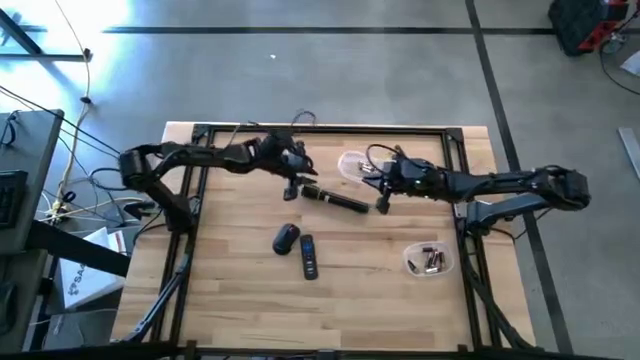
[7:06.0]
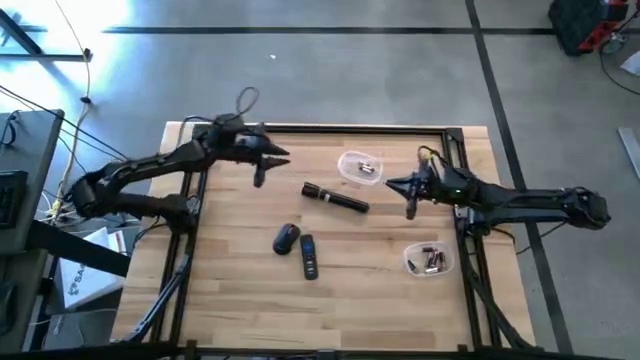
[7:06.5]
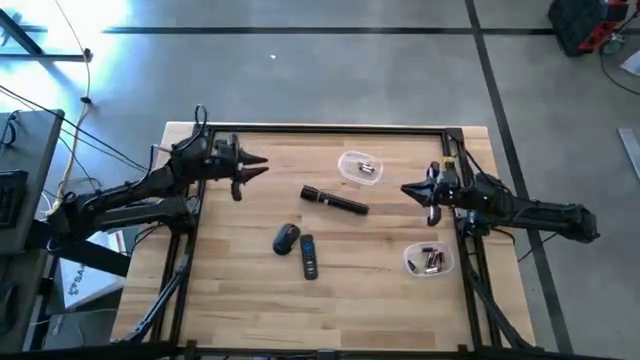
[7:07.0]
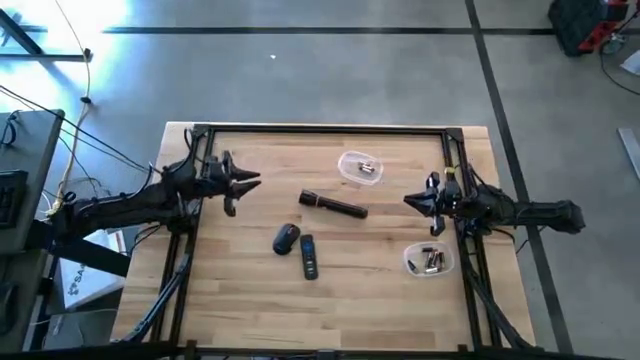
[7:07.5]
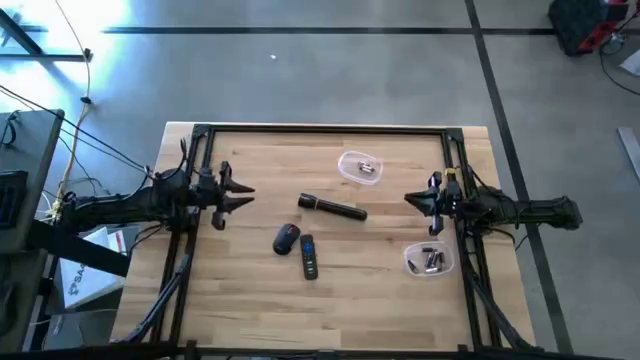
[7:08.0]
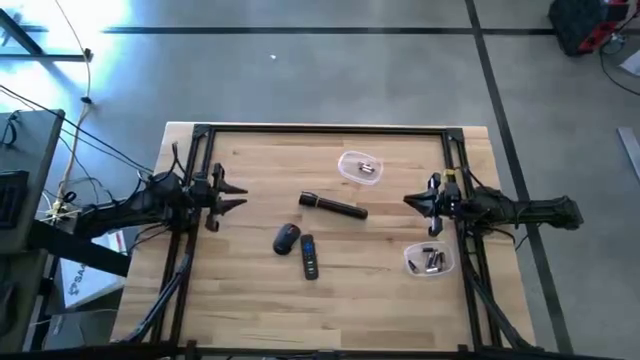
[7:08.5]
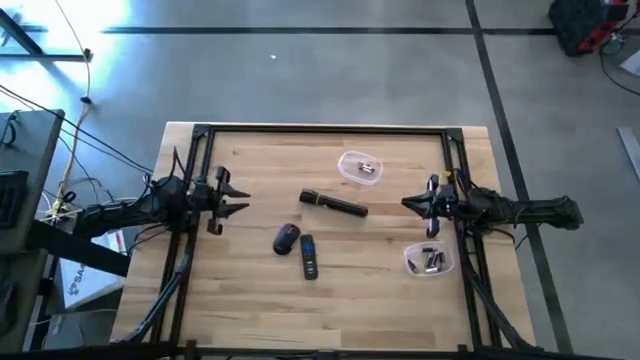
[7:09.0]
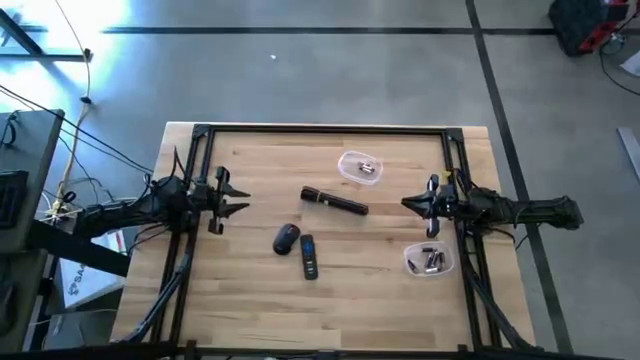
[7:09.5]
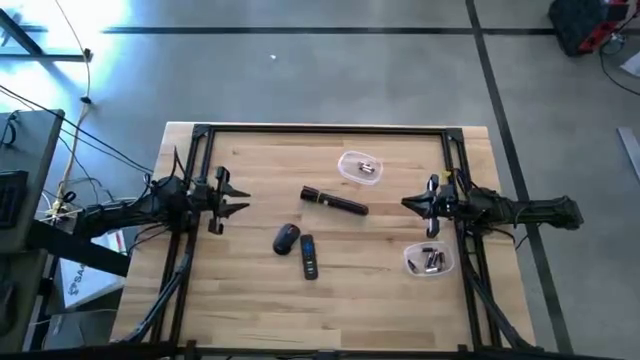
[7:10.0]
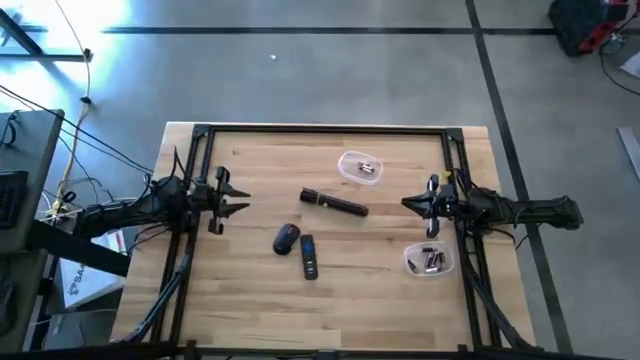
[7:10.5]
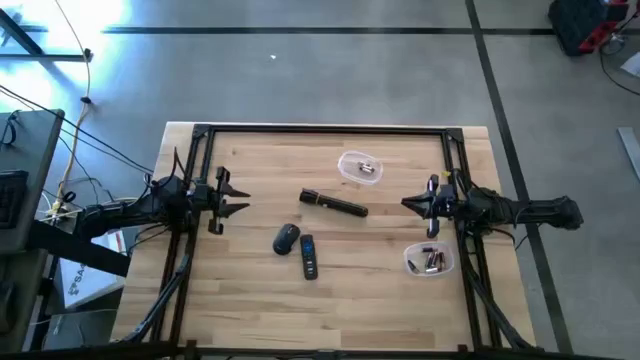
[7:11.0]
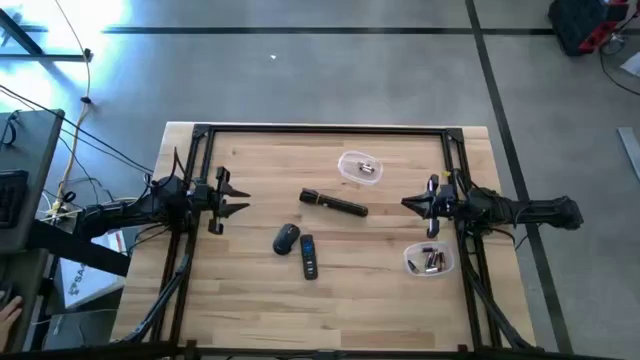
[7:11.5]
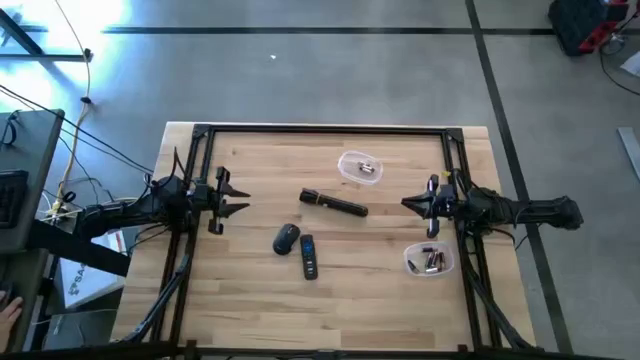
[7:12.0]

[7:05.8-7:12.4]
Task: Insert battery
Return to Home Position

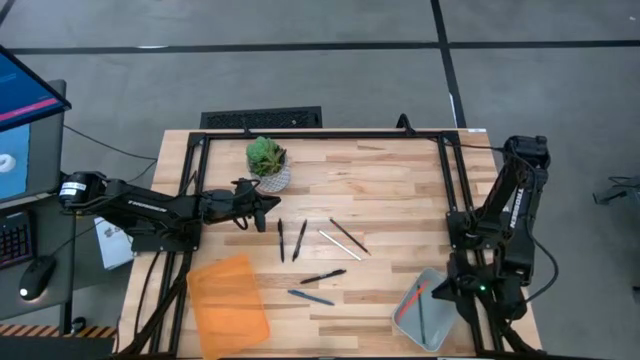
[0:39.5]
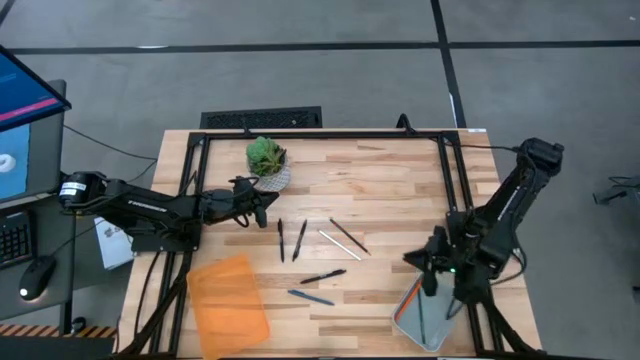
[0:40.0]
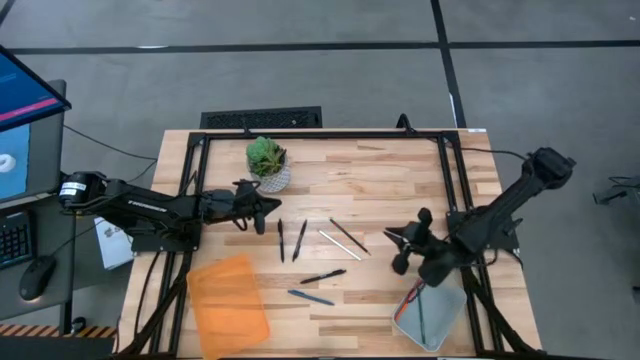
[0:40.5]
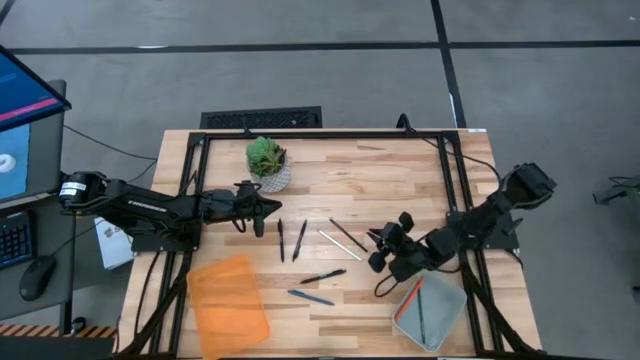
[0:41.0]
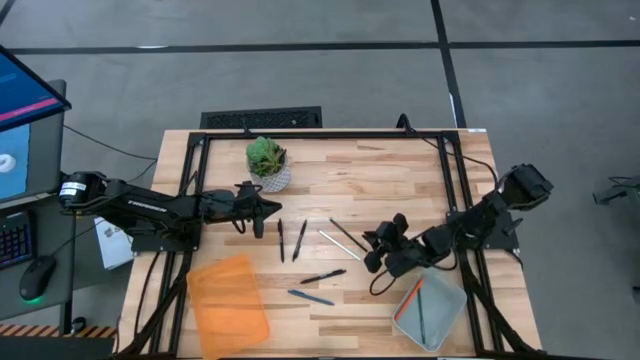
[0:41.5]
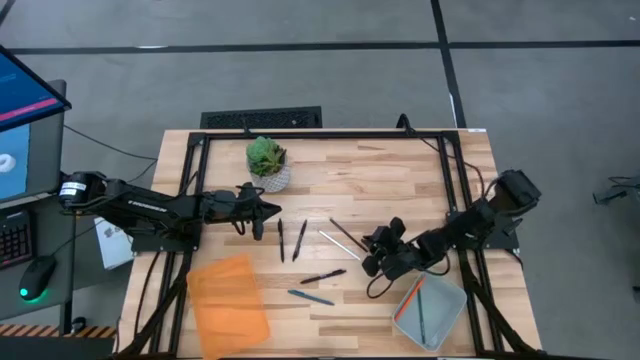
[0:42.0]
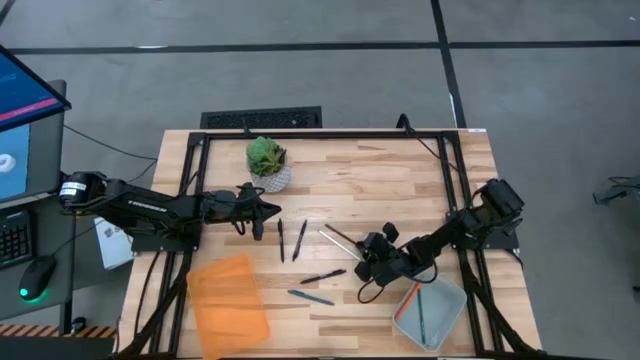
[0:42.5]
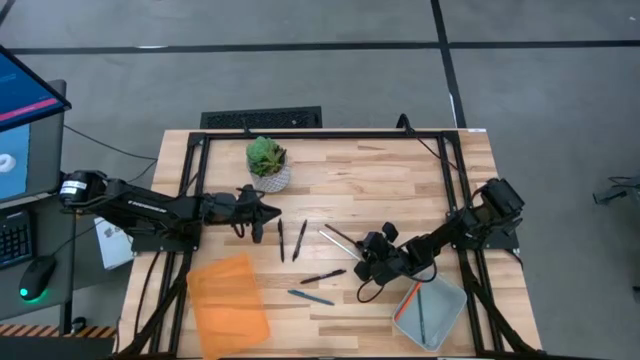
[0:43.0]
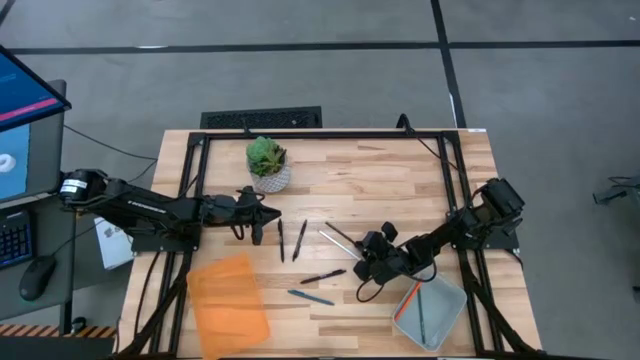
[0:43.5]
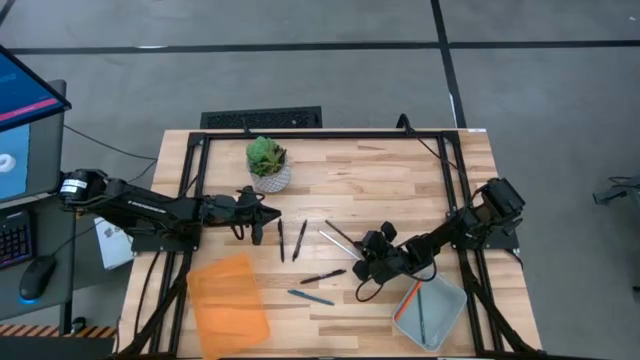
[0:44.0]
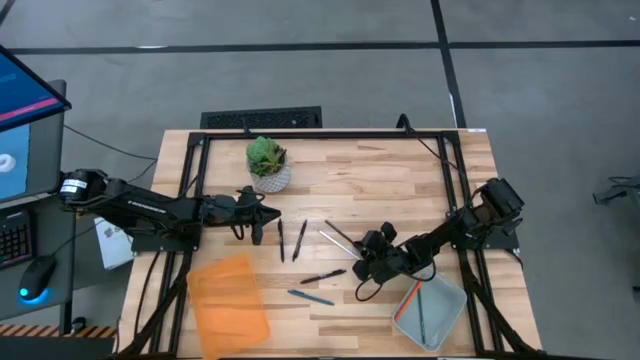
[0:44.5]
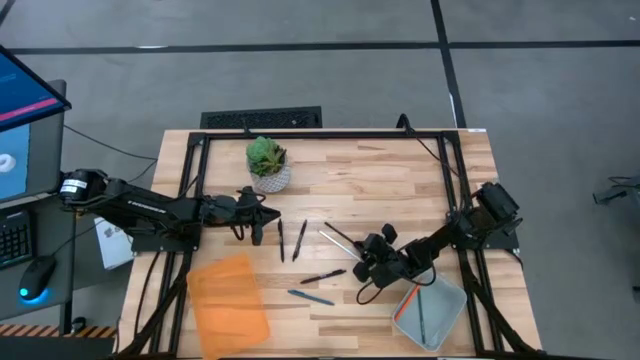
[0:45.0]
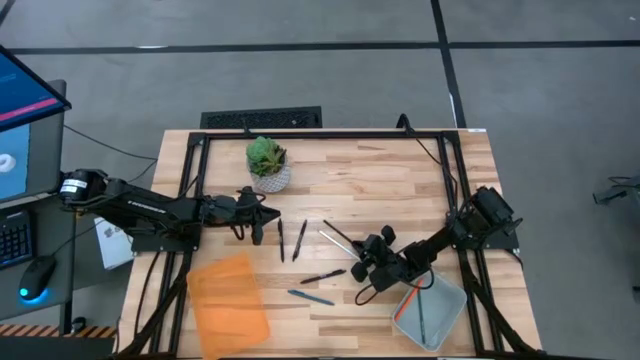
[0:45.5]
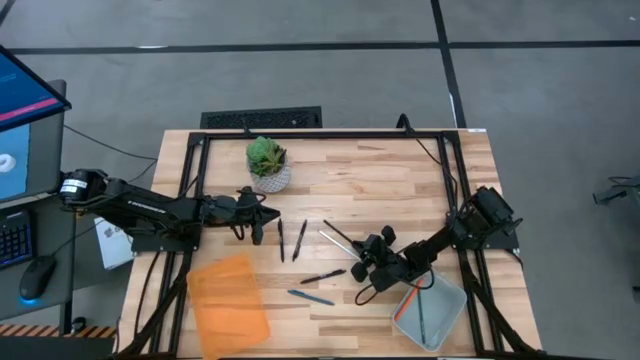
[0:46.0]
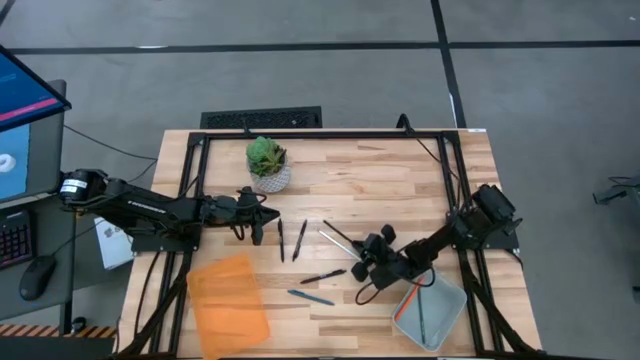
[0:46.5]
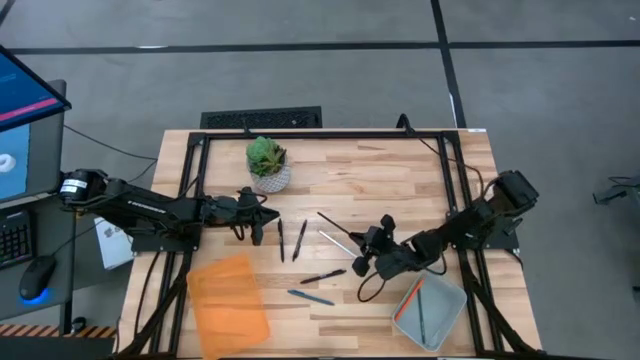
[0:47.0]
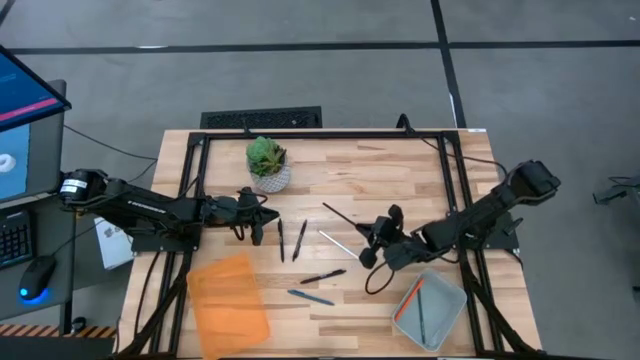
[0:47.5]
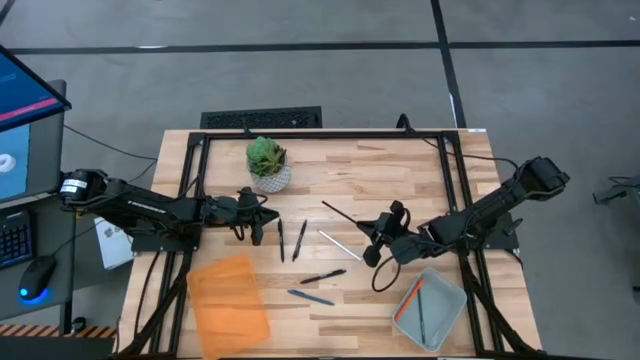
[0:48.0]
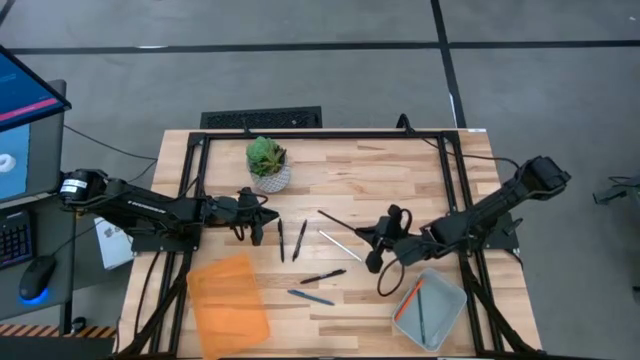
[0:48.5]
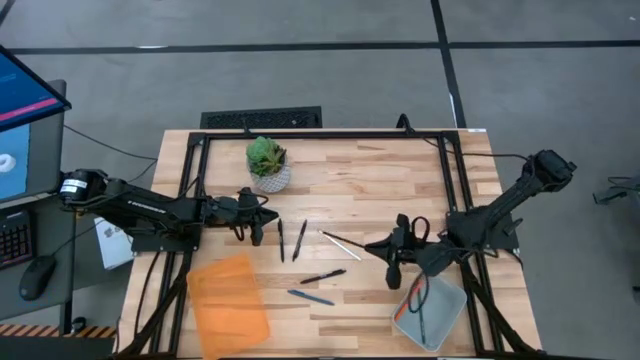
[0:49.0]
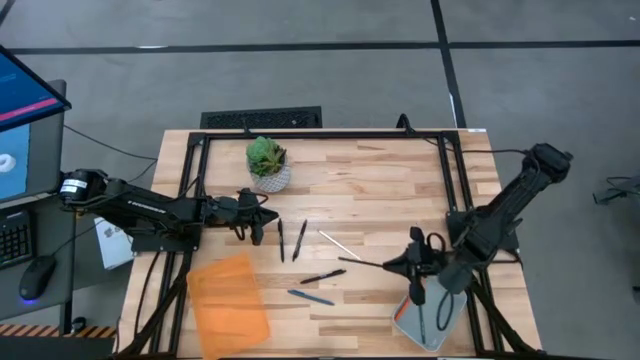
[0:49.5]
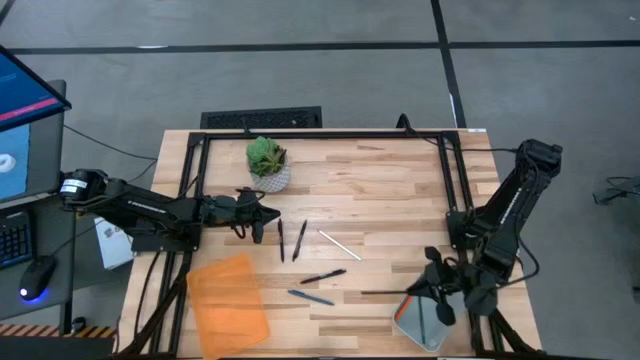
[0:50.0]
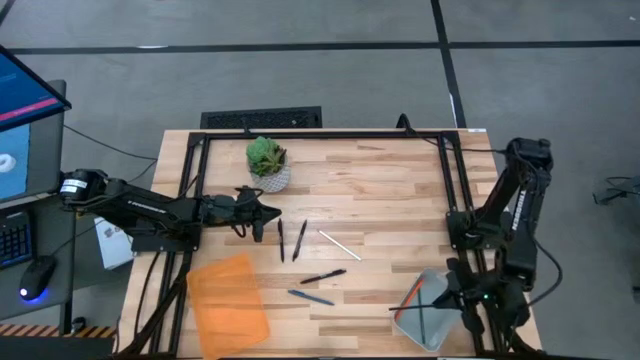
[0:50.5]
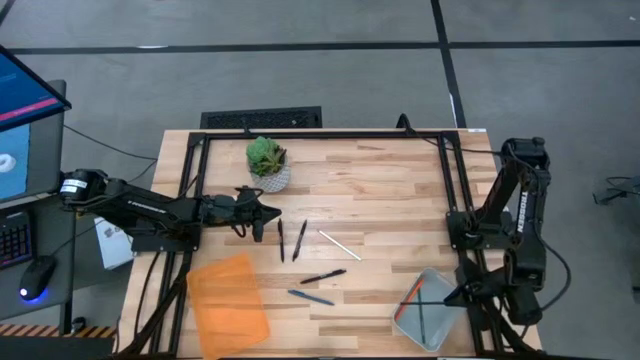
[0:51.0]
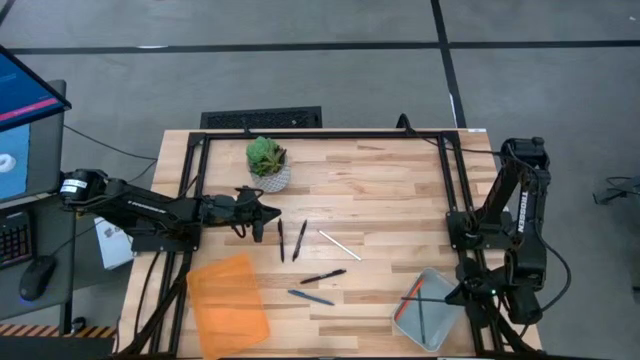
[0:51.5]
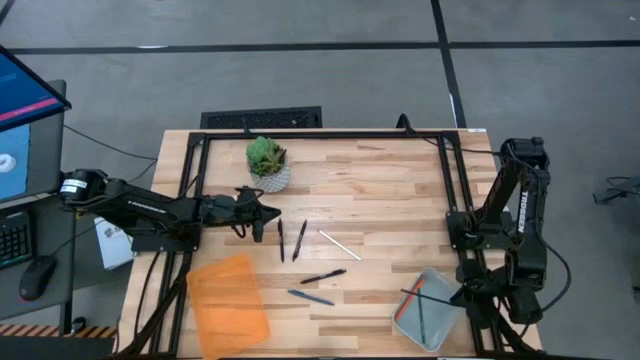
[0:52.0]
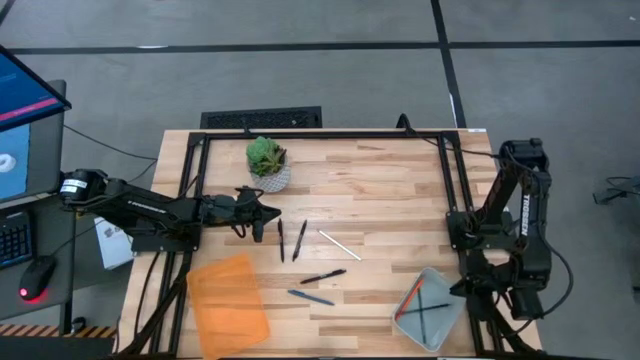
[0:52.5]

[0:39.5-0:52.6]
Task: Sort pens & pencils
Put the black pencil into the gray bin
